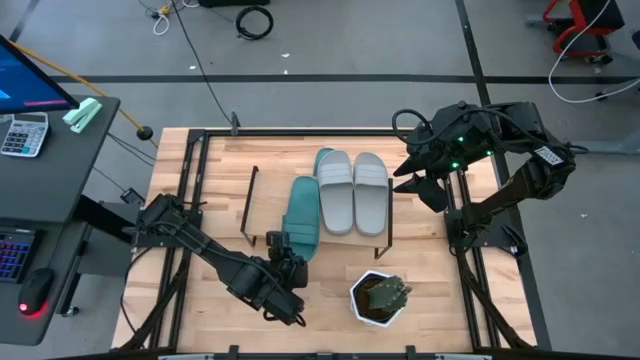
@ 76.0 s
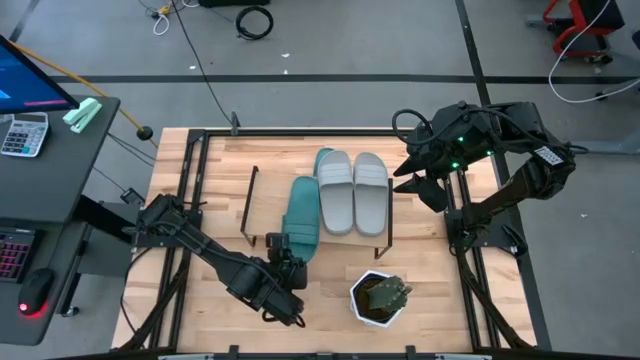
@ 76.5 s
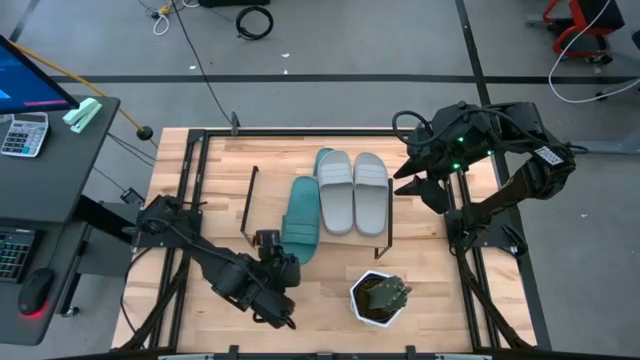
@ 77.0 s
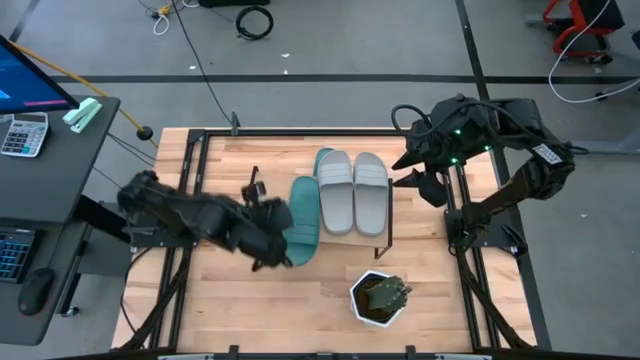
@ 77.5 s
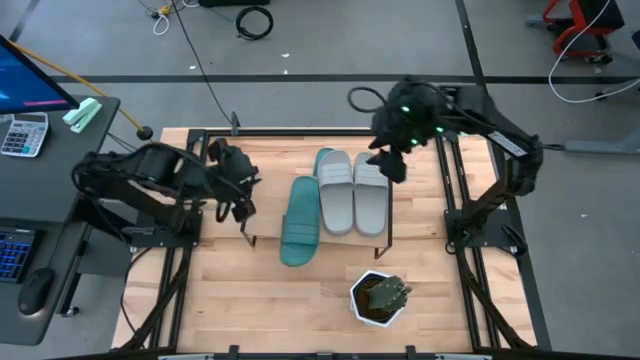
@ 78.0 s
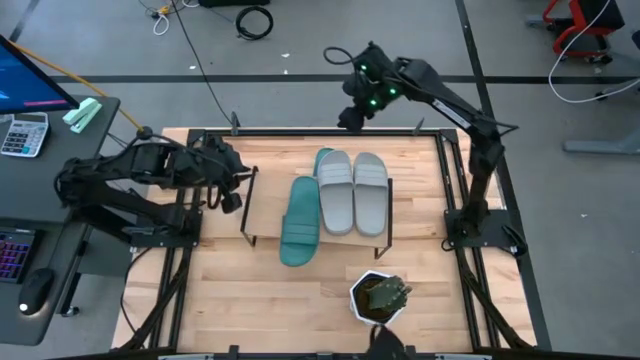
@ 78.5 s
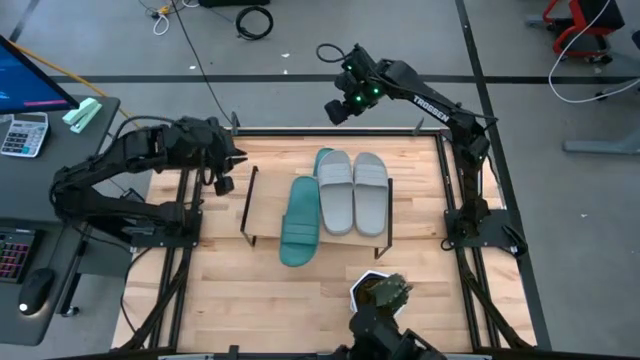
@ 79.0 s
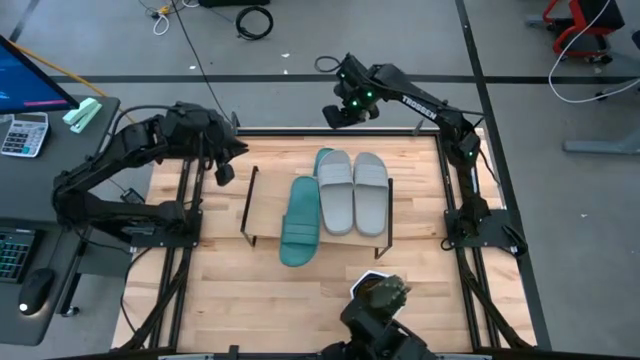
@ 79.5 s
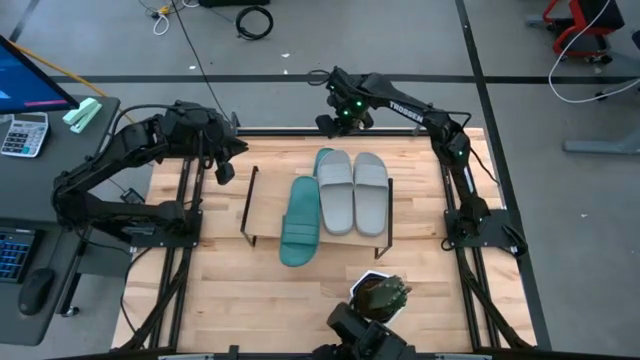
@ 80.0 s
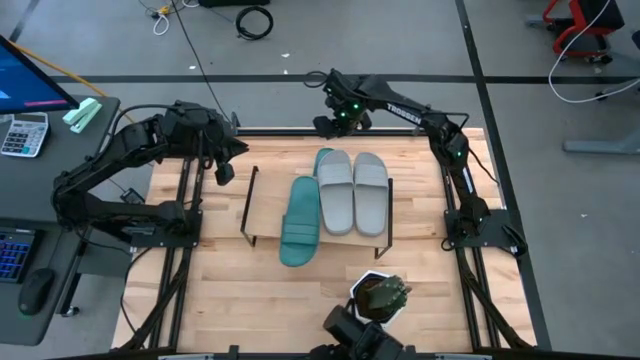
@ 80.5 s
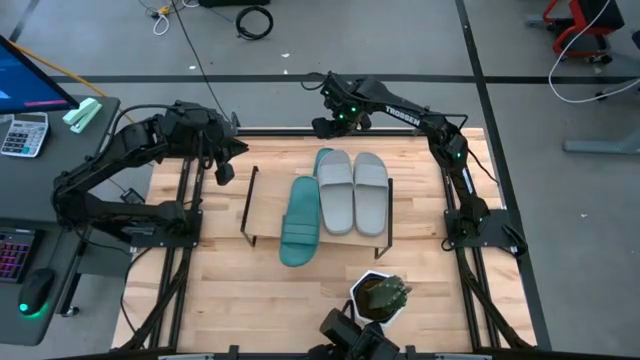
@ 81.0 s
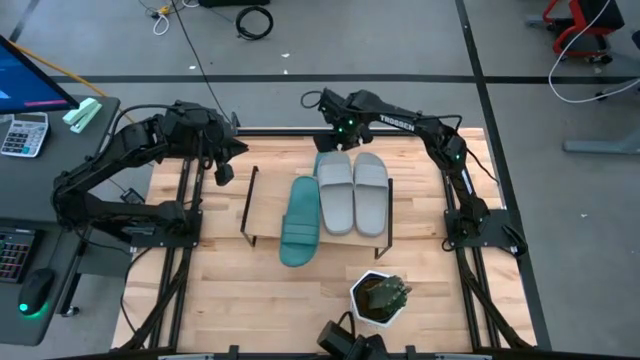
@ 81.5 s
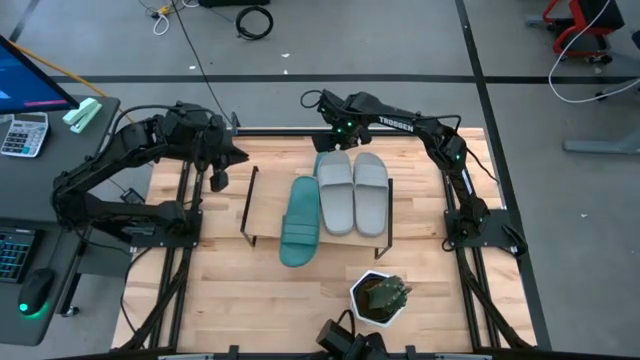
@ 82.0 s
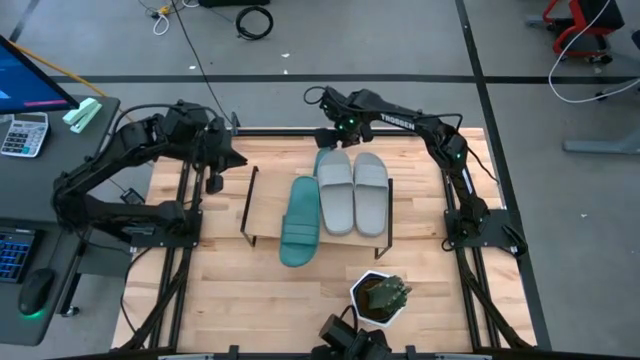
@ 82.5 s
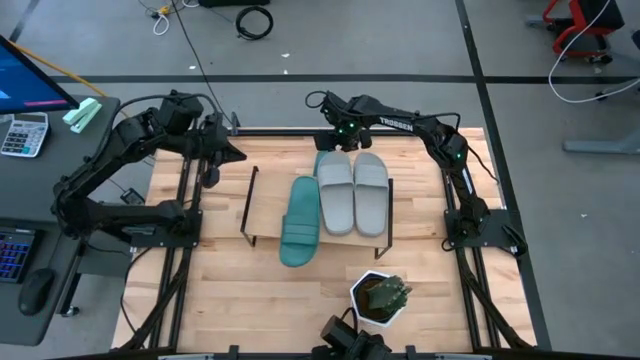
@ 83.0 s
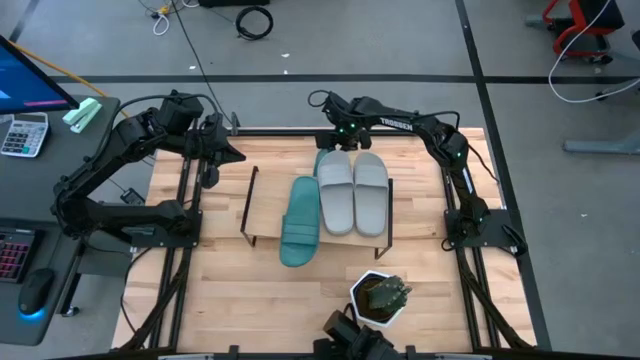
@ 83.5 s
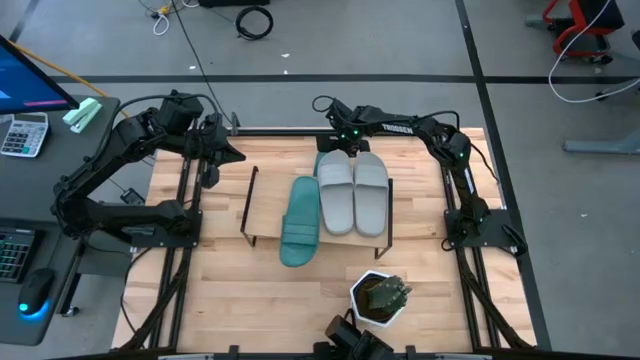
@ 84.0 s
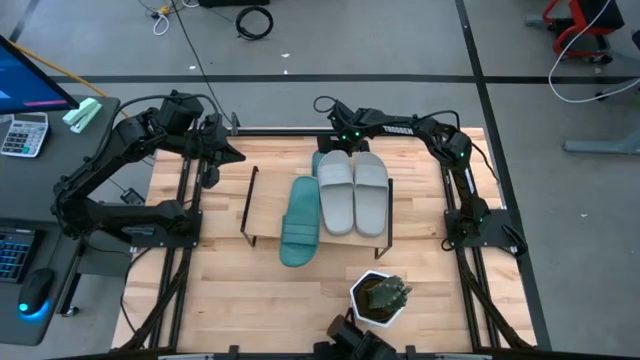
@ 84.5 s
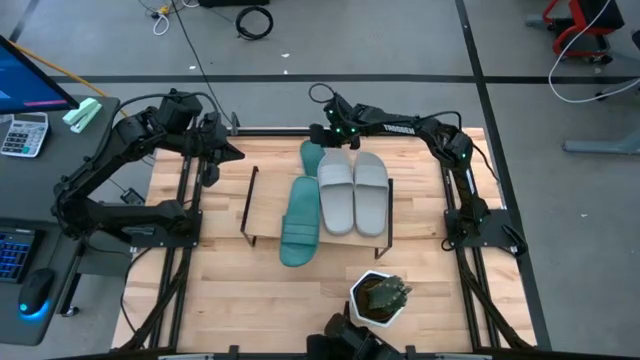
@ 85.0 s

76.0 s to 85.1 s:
Task: Pick and place slides into the shelf
Put the green slipper on the shelf

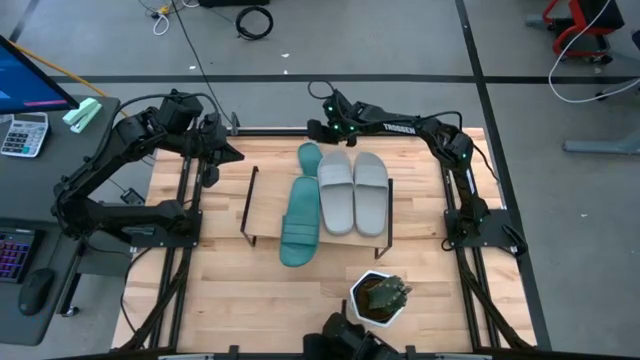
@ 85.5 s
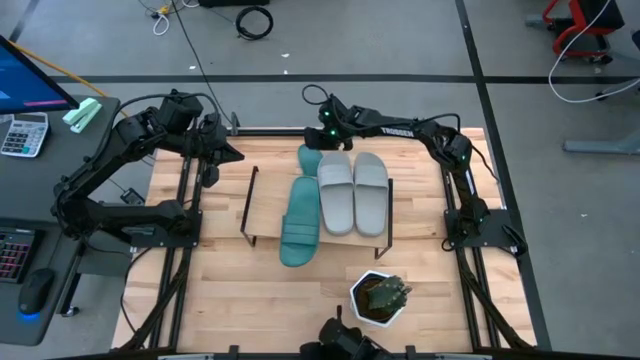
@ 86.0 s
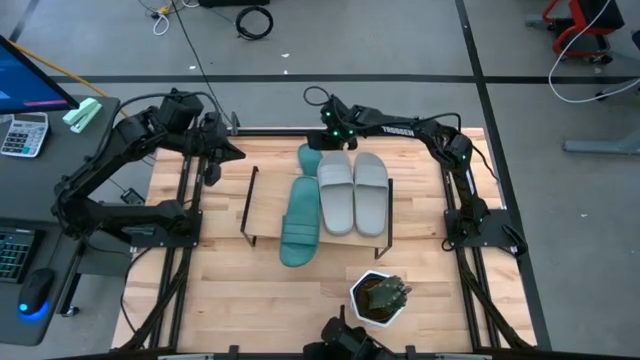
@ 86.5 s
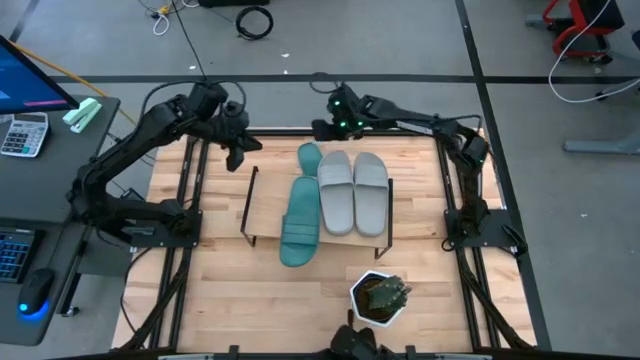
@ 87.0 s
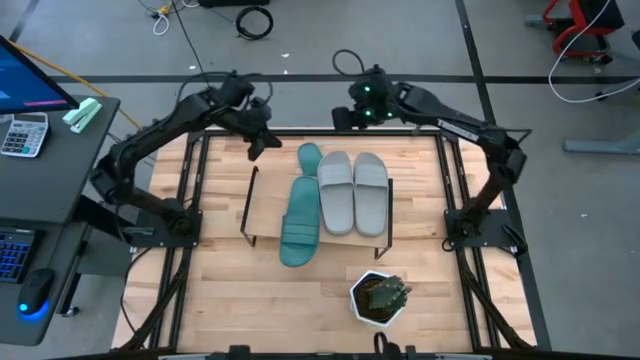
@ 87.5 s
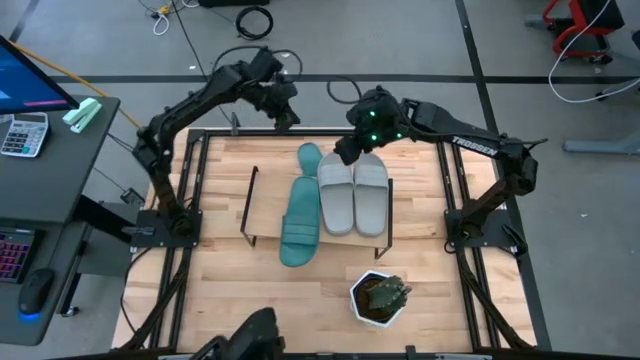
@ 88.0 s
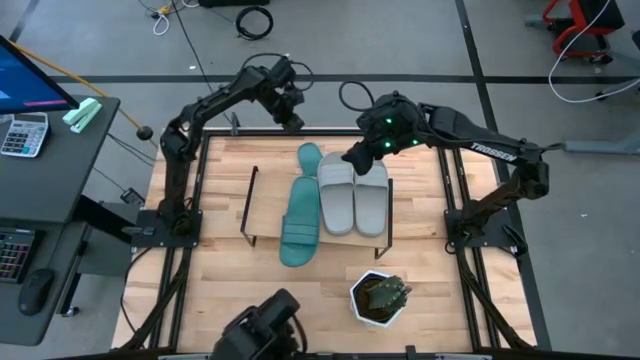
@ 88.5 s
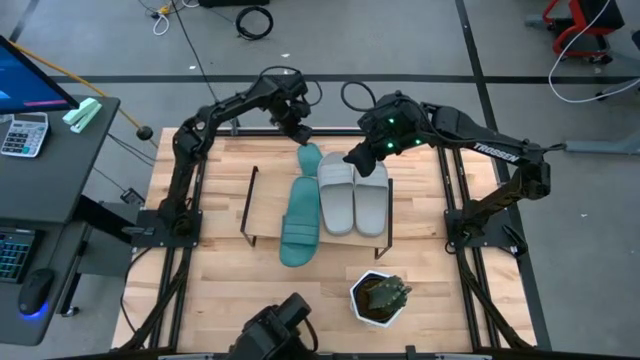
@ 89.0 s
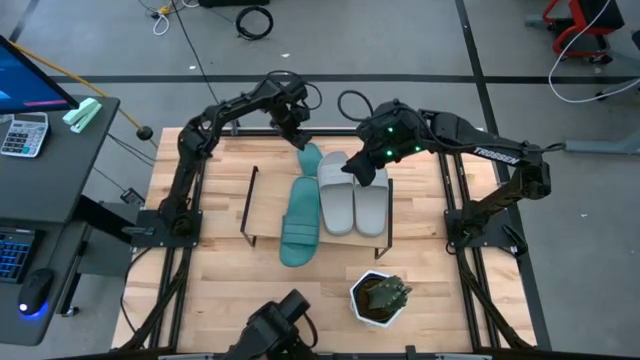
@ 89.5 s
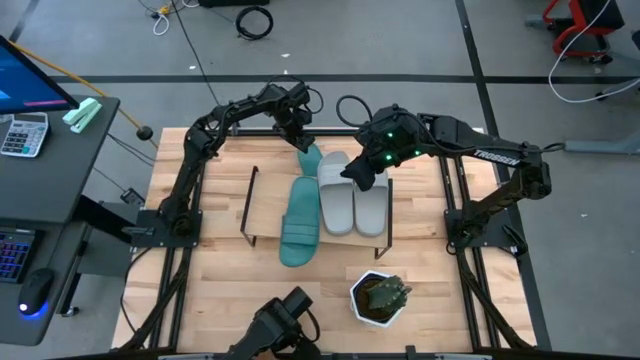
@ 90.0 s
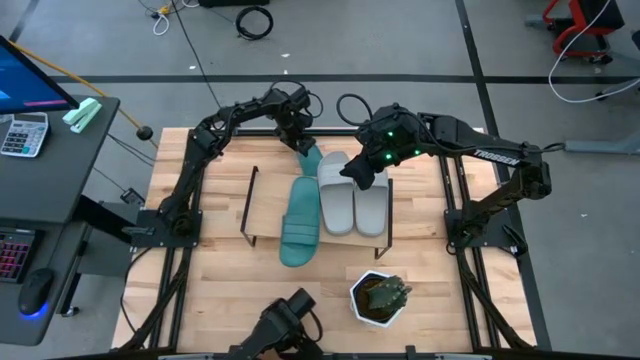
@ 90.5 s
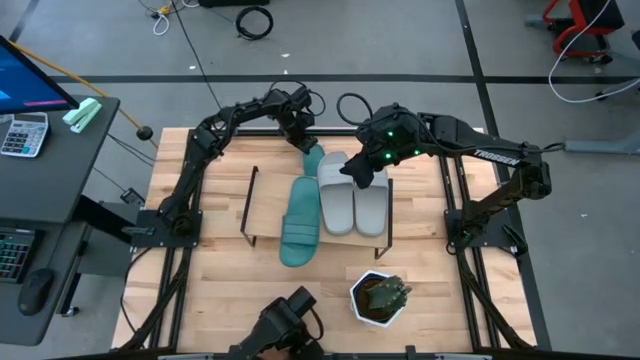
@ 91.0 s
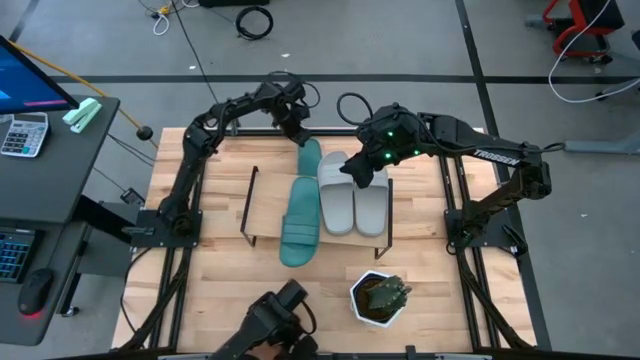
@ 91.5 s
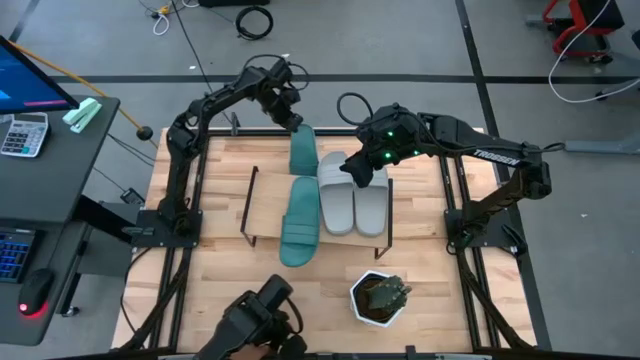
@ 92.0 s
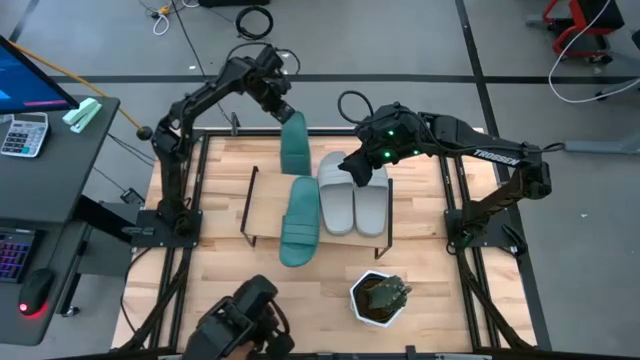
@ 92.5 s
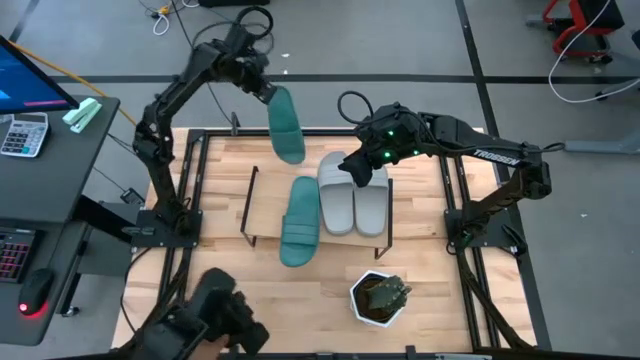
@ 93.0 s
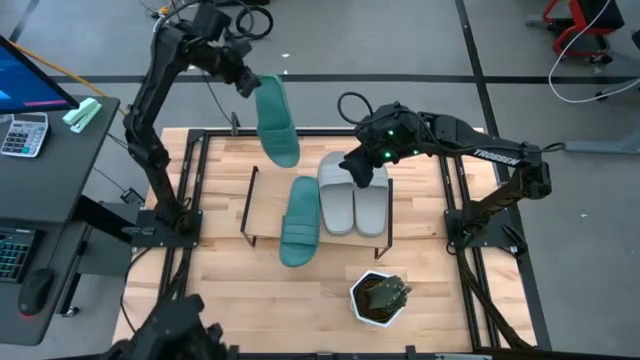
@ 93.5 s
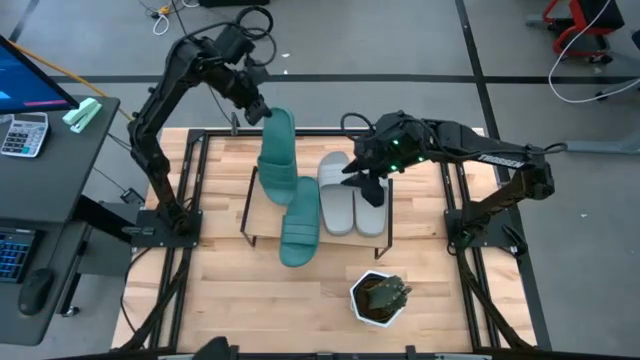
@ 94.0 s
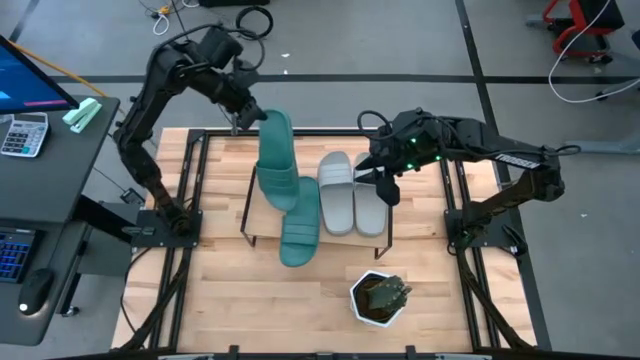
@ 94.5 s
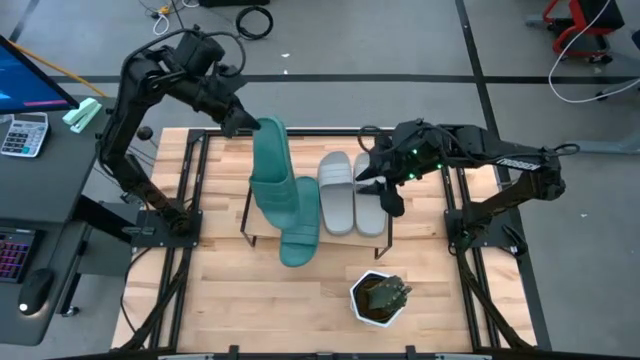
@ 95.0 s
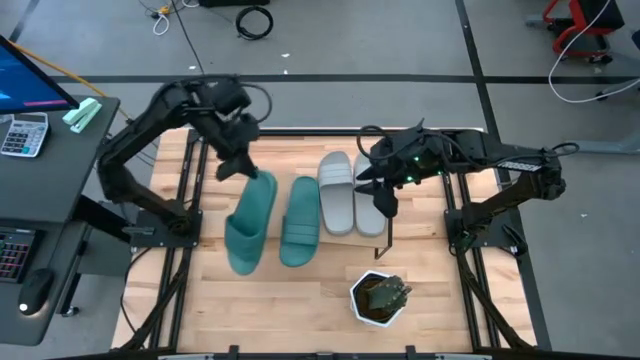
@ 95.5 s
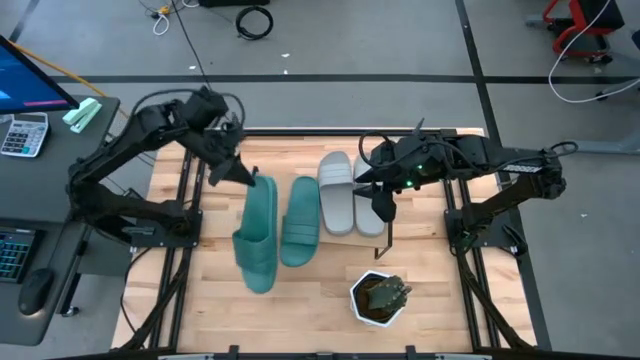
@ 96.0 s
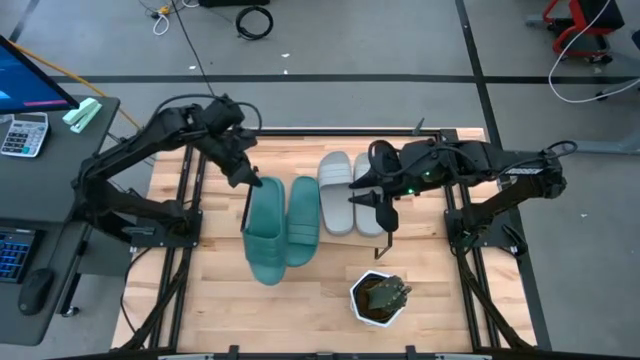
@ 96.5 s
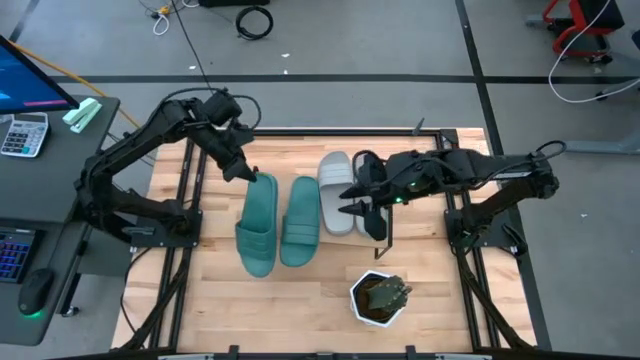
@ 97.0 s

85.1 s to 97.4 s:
Put the green slipper on the shelf
